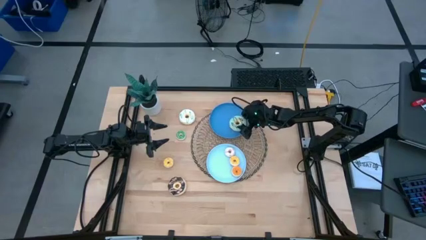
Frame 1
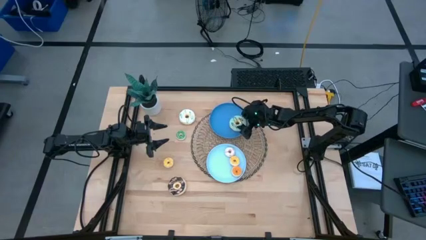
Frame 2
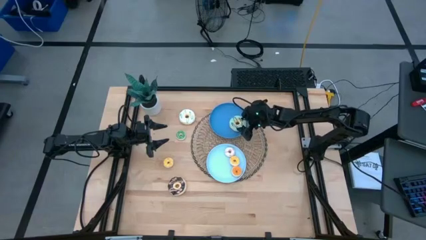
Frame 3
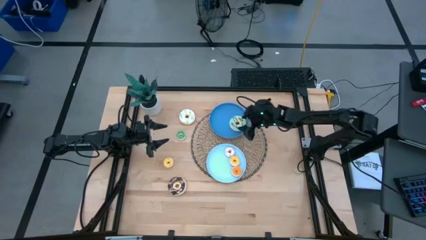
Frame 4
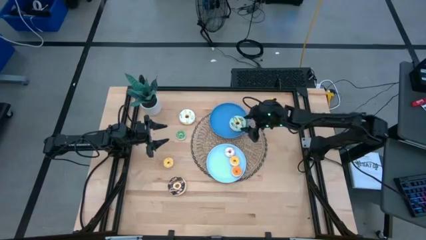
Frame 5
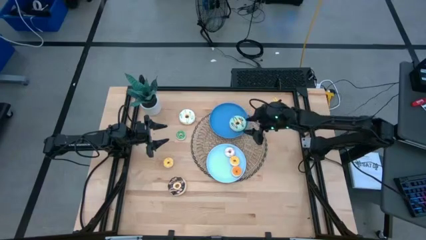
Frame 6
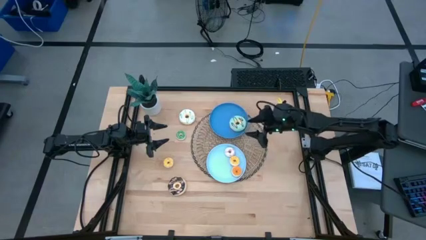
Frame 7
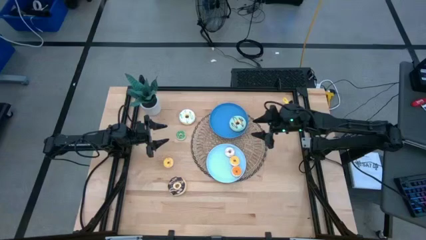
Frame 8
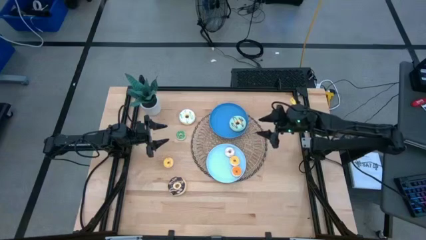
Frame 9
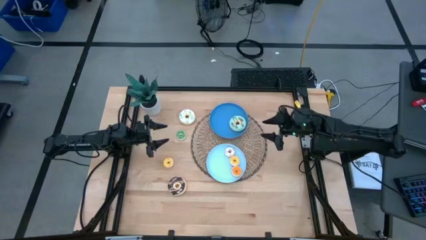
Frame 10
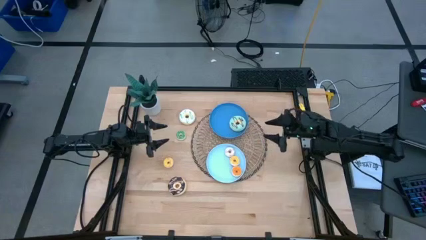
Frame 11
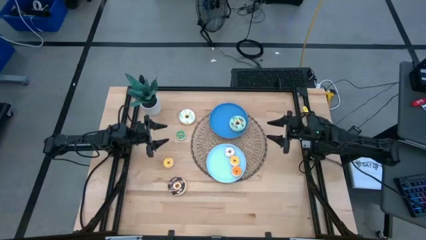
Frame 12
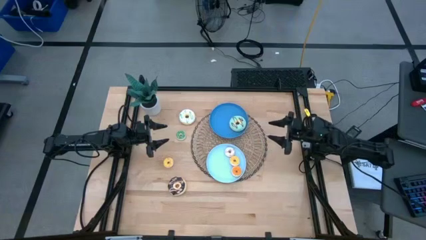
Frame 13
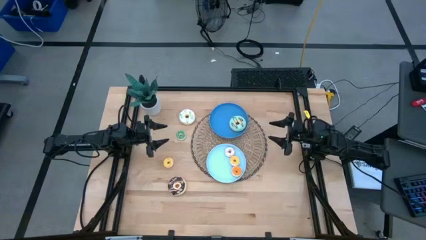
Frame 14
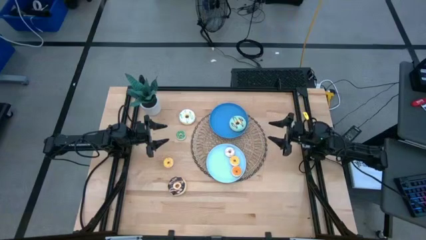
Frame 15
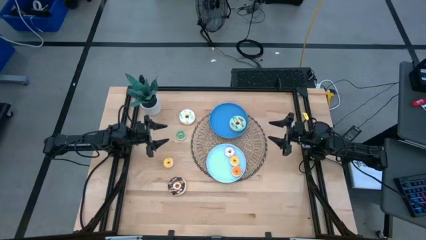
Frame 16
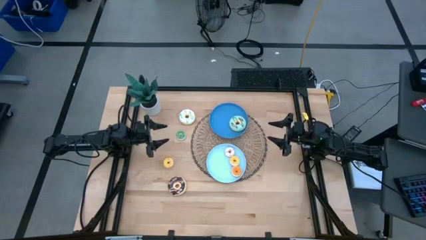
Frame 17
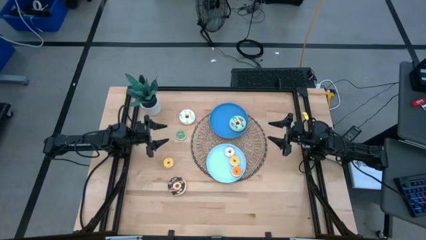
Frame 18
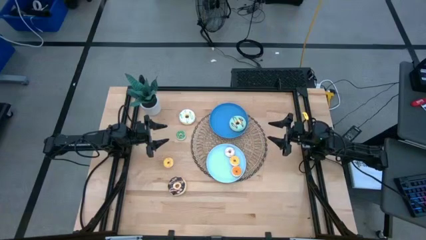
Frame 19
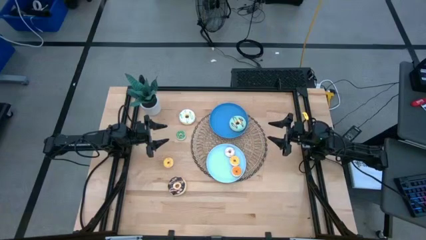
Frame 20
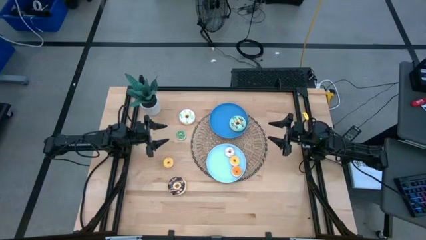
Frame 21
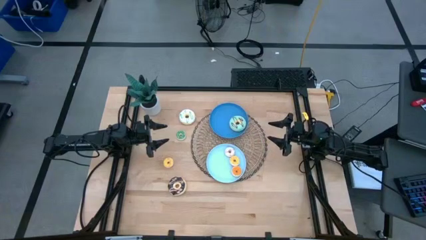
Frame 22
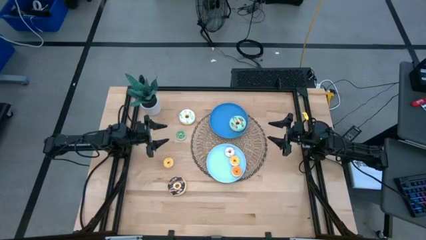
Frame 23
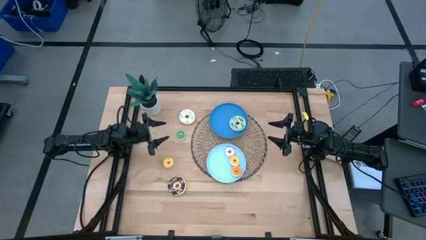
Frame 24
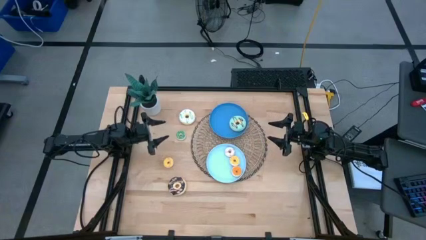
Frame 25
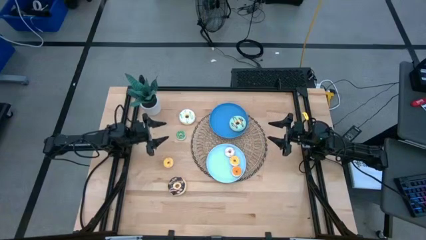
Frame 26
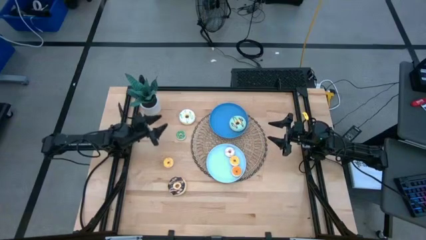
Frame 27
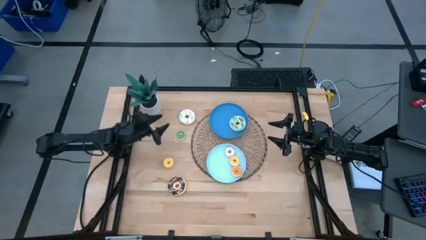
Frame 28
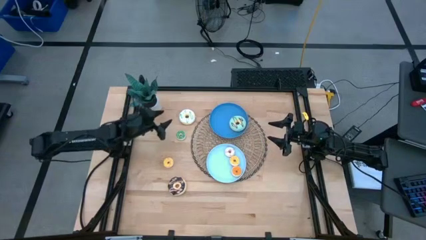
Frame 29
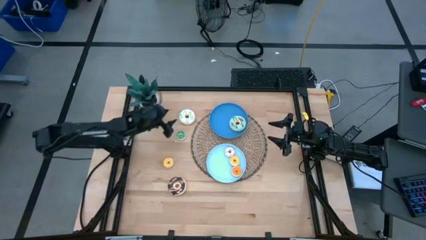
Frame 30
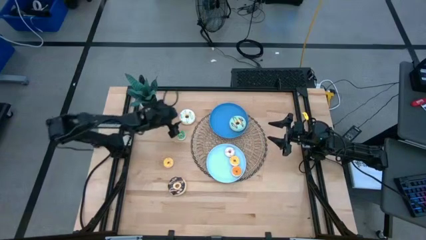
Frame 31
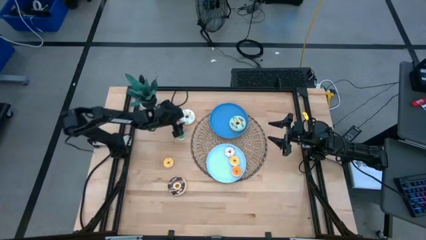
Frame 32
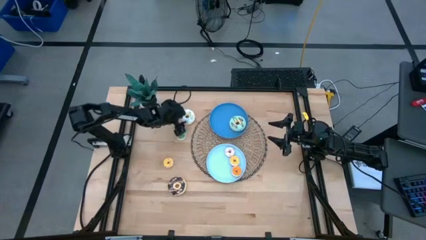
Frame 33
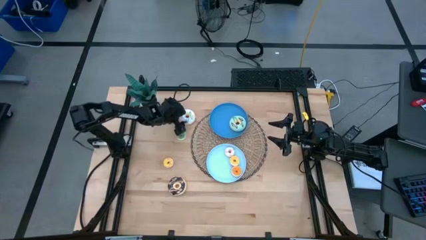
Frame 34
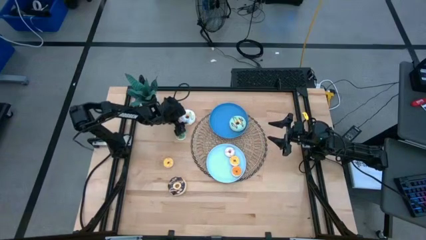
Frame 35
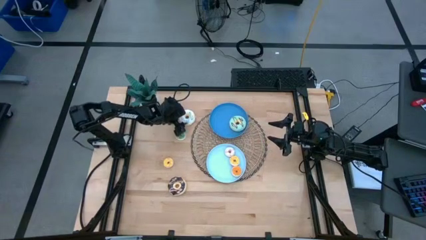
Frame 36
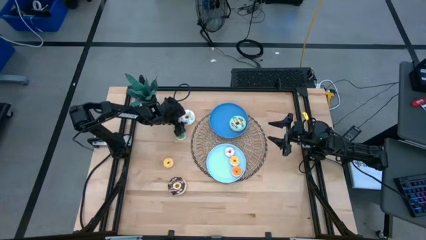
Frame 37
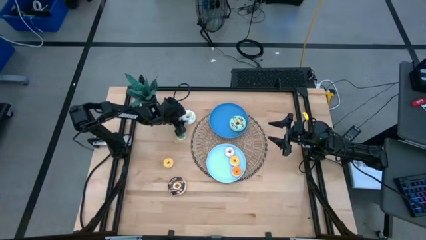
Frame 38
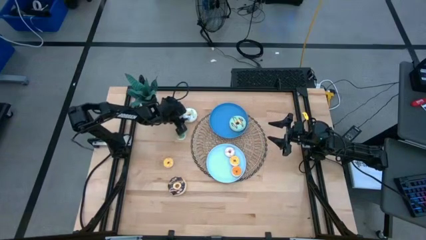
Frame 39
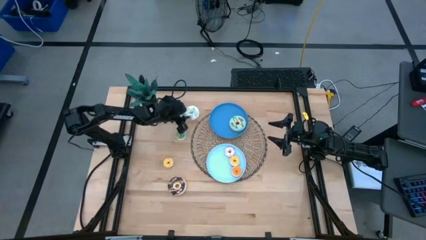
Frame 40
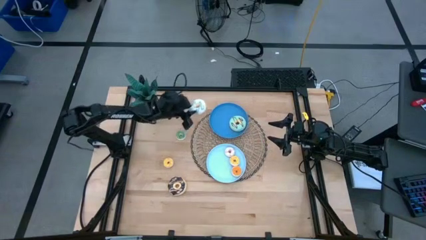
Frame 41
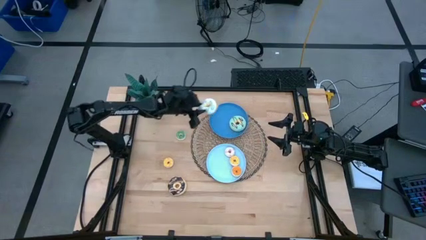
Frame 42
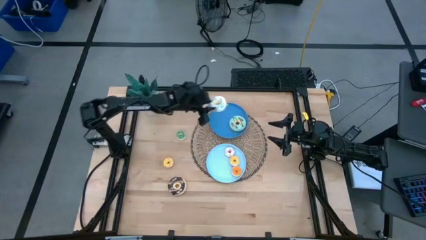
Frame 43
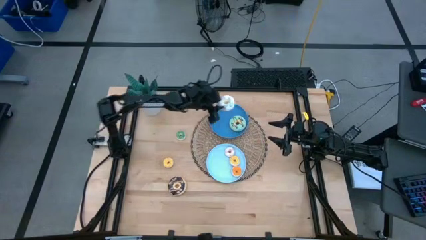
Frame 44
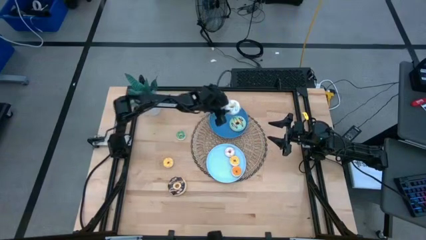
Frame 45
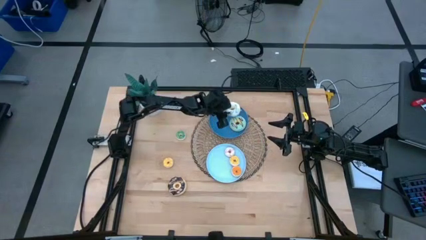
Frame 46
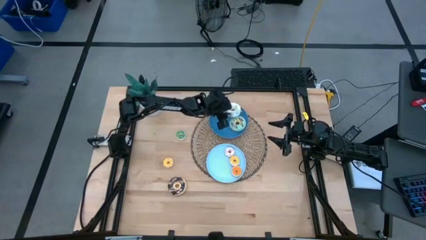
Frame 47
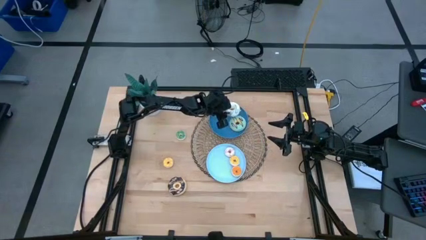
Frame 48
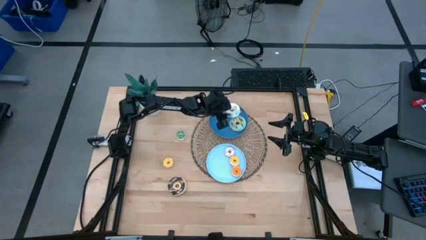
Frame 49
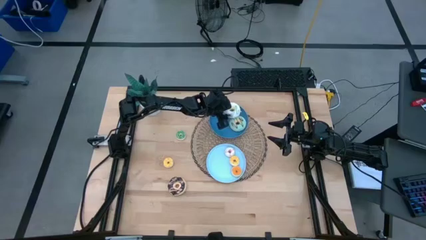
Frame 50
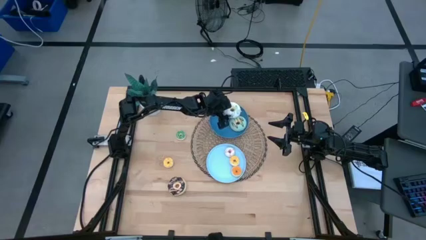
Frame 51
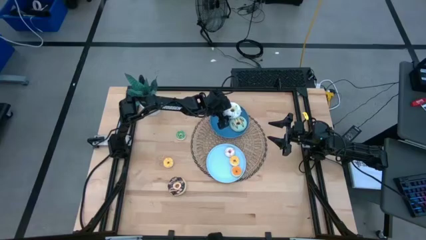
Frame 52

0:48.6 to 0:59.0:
Task: Pick & Place donuts
Put the big white donut on the blue plate
